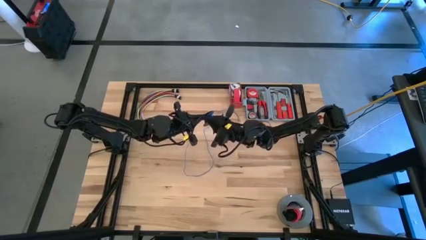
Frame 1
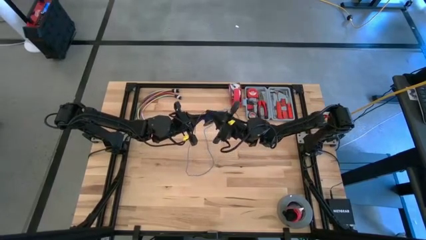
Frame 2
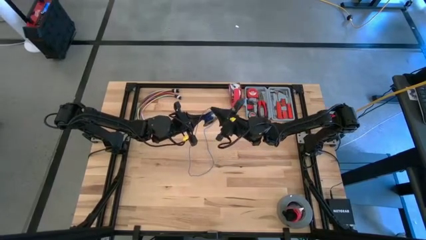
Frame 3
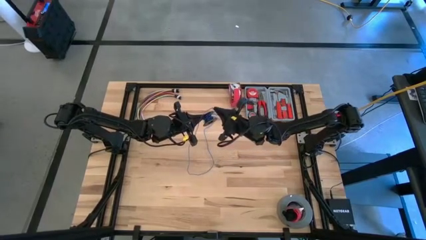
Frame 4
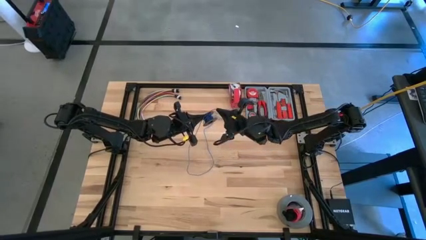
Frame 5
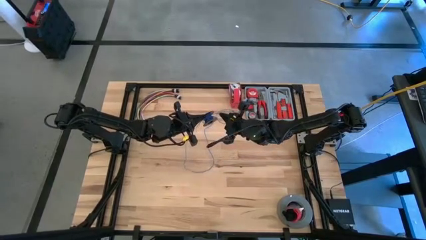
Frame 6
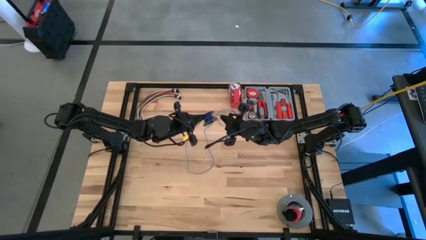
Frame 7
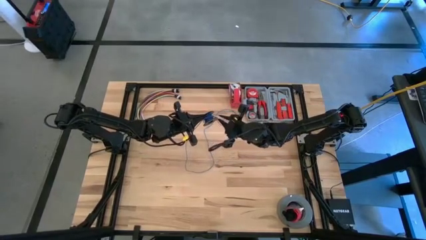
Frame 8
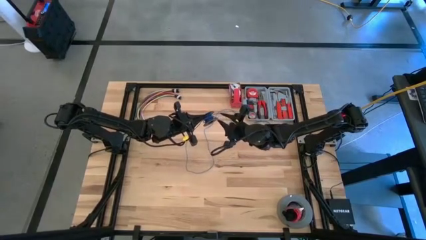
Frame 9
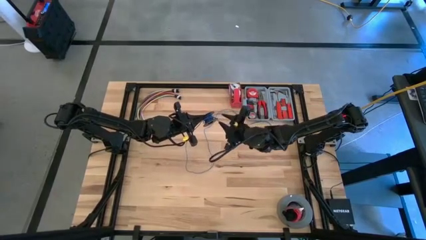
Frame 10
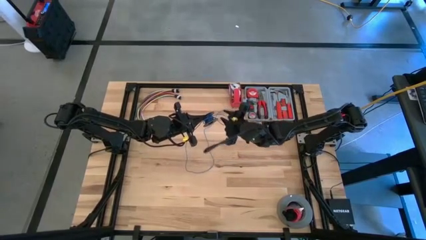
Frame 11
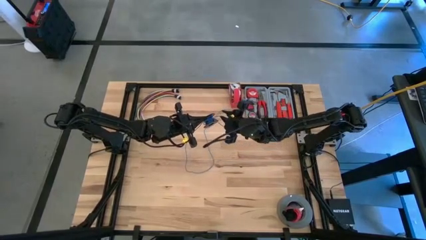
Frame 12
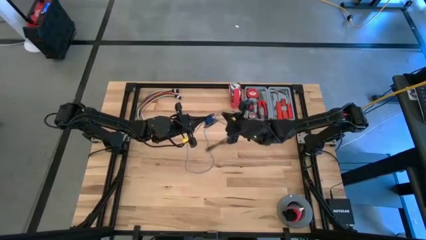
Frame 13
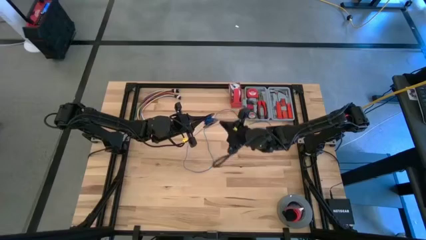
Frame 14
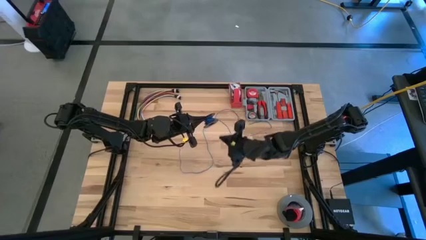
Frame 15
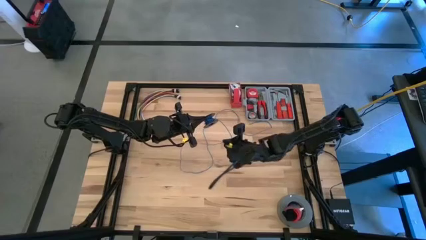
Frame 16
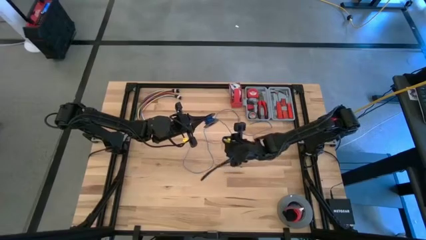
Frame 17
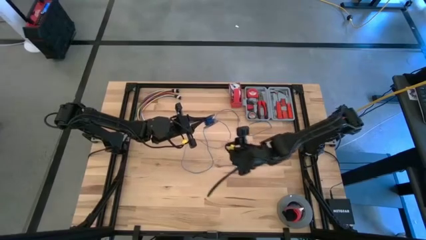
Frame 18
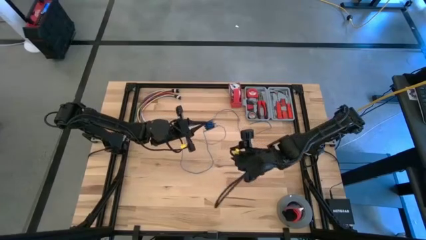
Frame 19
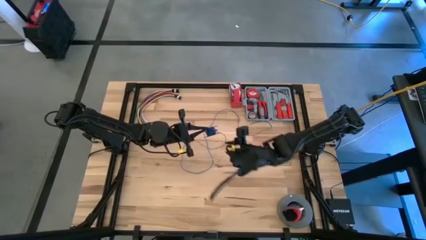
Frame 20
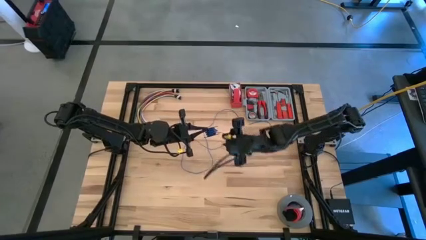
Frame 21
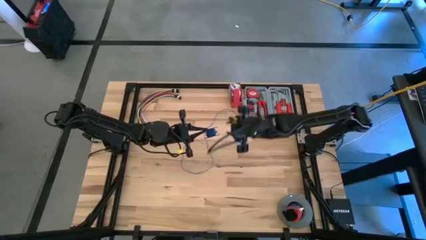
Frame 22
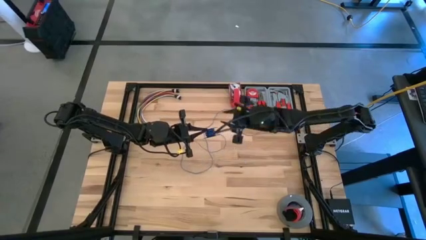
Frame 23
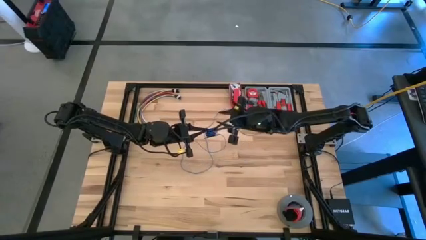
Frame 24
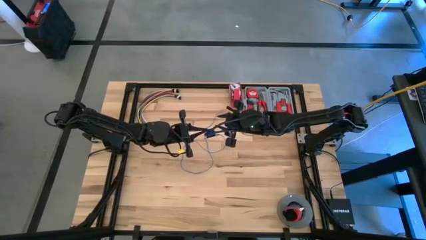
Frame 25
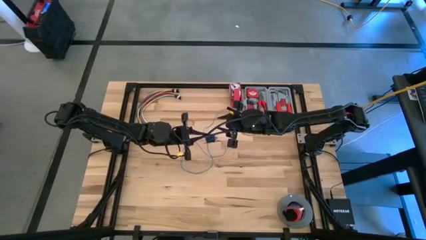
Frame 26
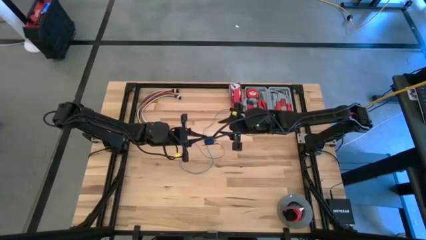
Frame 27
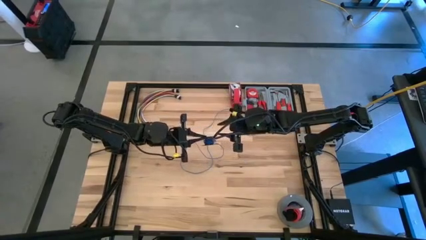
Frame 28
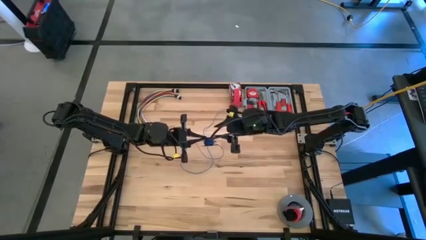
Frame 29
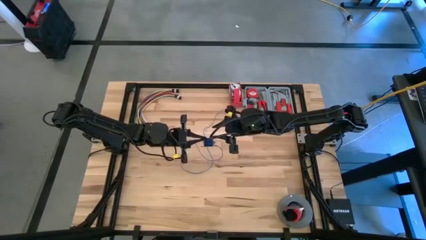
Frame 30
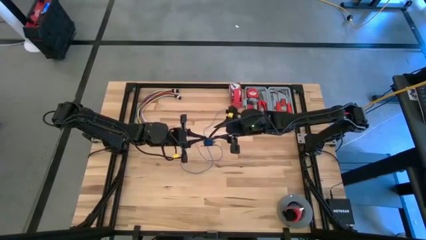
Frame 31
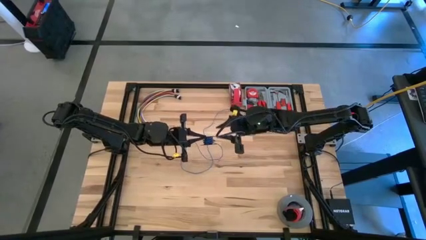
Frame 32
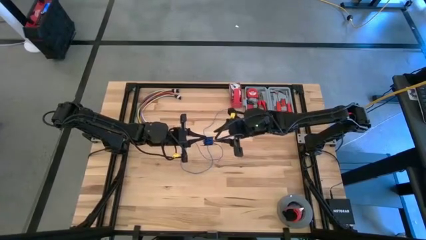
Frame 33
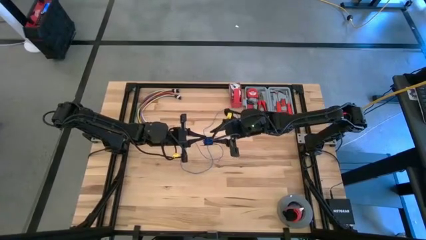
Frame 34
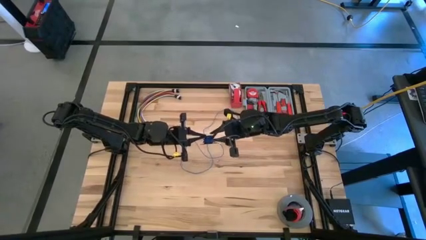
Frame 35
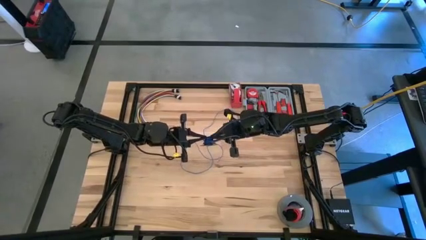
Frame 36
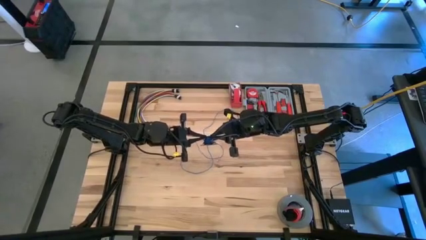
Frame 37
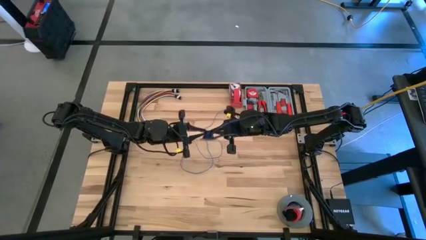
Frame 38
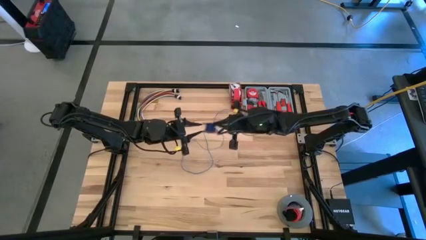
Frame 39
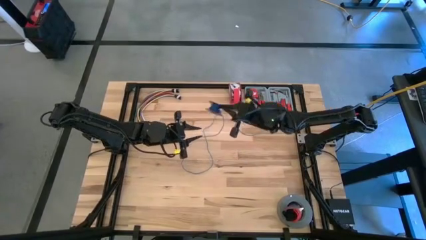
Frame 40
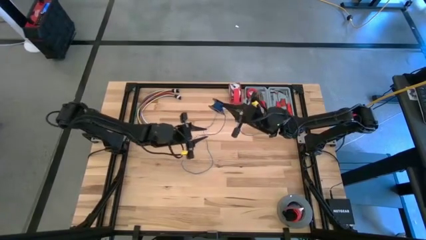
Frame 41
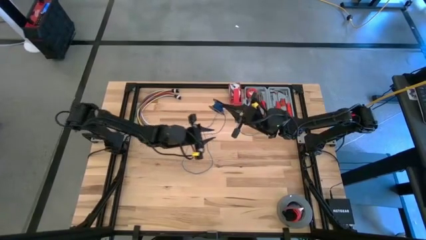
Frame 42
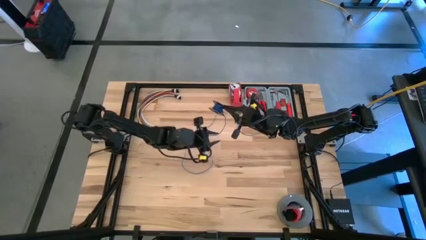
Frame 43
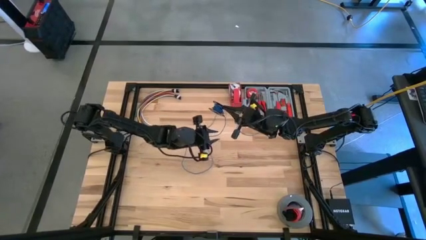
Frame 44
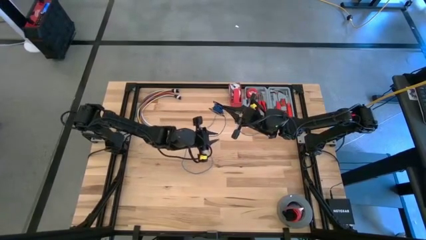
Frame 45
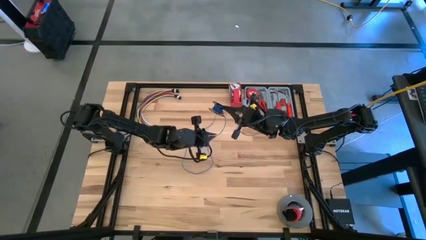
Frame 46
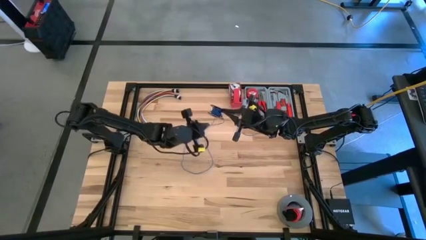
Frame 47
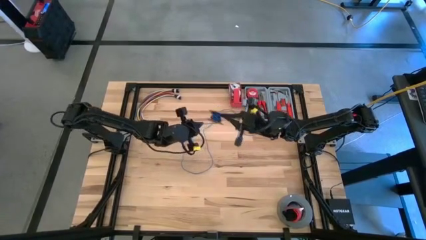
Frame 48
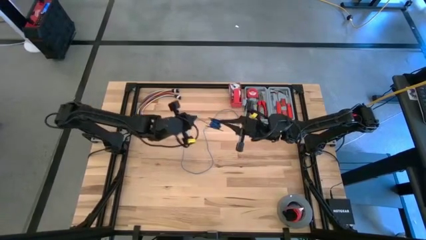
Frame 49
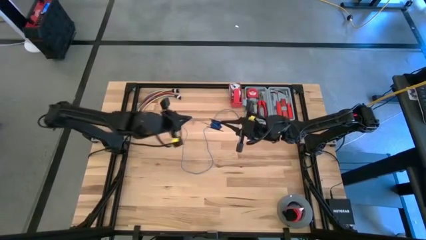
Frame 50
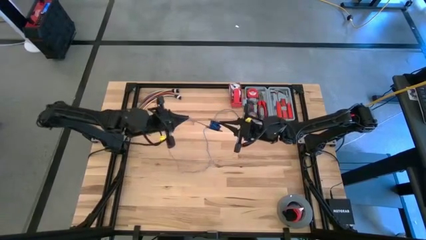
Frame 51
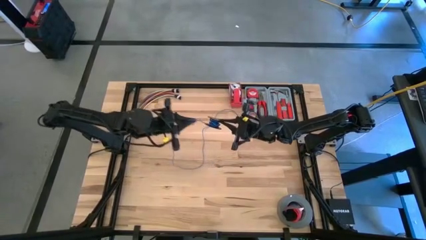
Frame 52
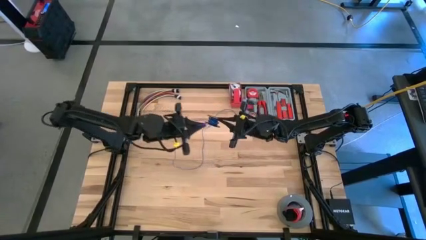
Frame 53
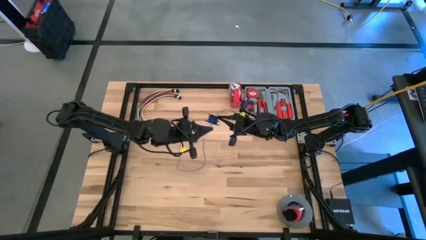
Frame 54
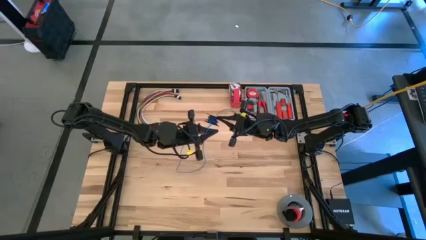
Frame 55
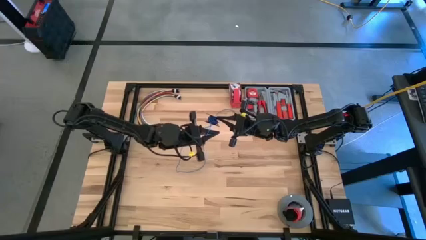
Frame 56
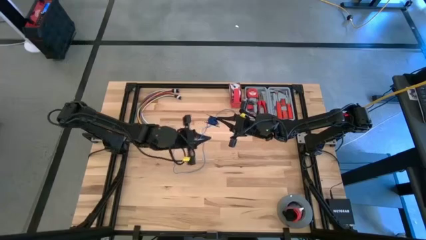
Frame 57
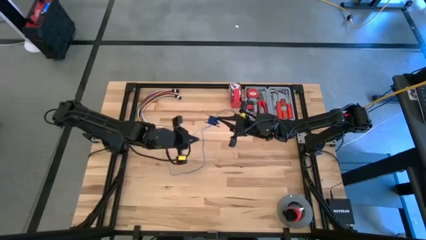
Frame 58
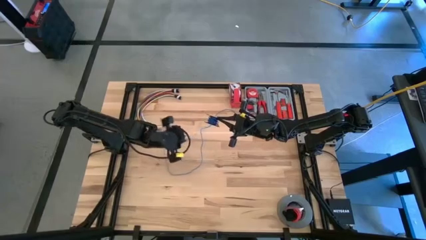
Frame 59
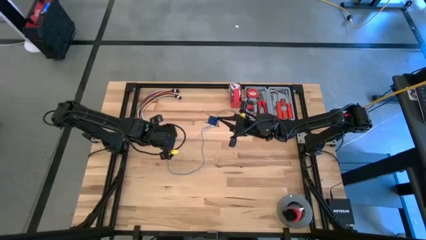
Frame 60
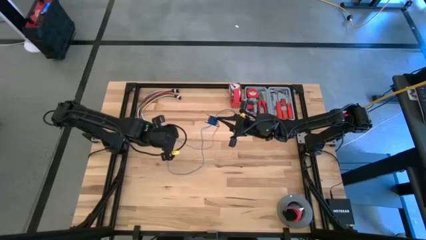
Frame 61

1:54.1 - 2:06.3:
Task: Coil cords
Coil the blue wire on the black spool

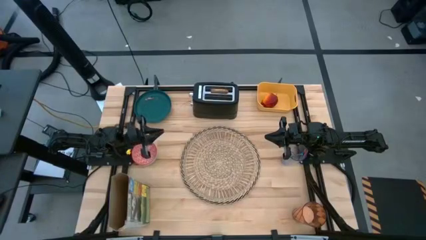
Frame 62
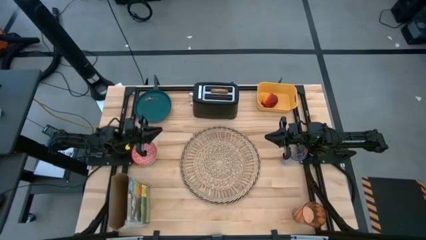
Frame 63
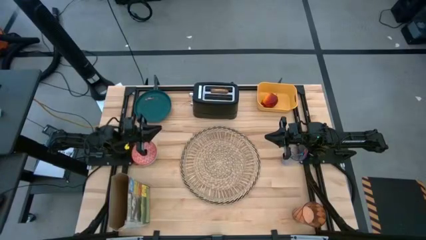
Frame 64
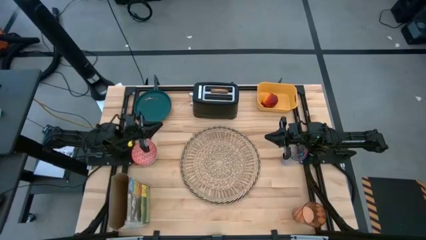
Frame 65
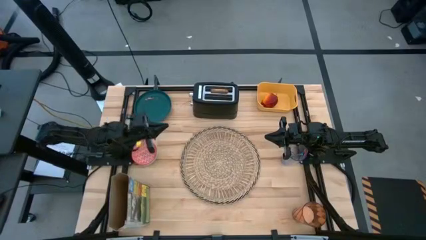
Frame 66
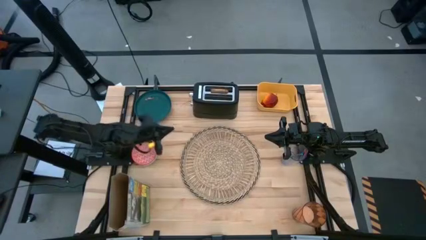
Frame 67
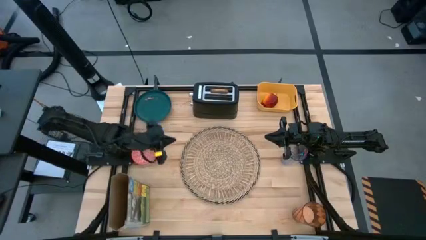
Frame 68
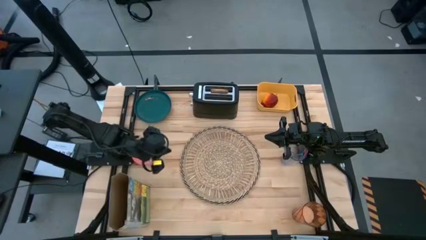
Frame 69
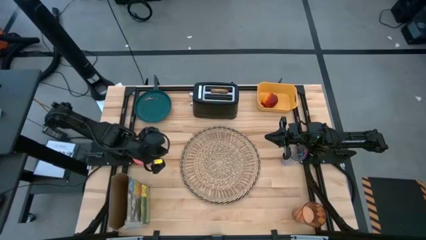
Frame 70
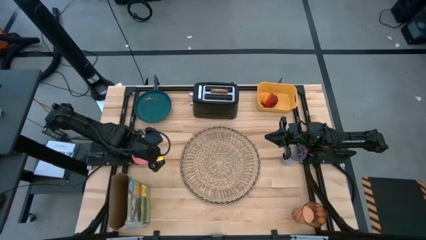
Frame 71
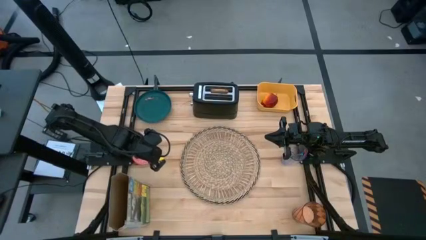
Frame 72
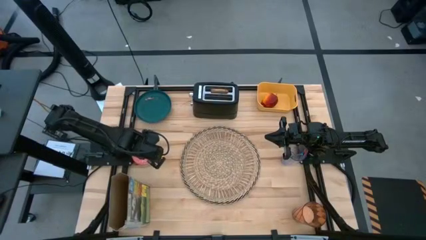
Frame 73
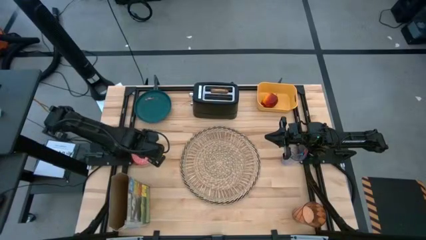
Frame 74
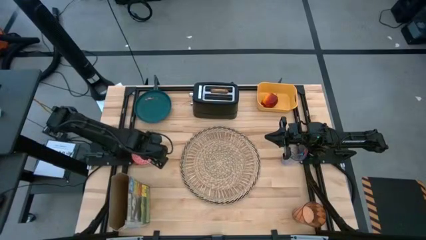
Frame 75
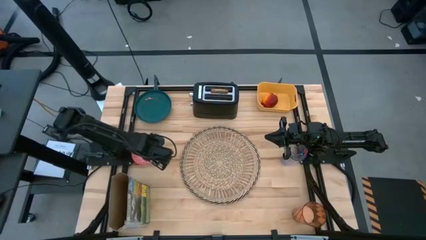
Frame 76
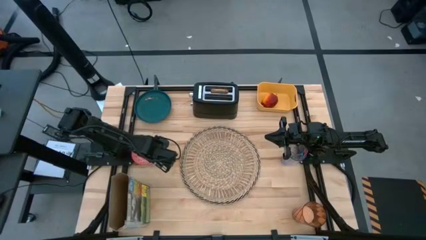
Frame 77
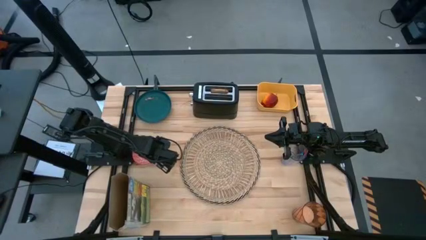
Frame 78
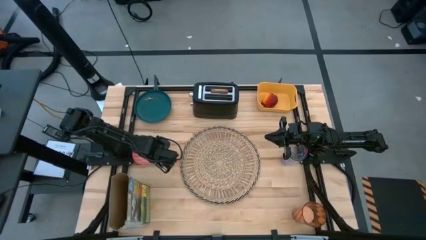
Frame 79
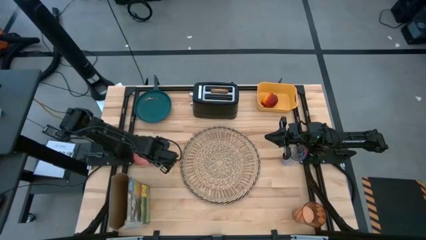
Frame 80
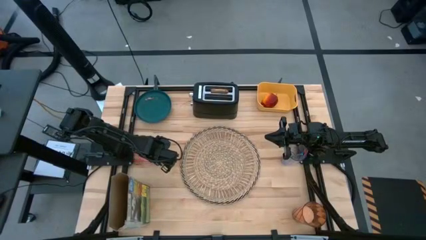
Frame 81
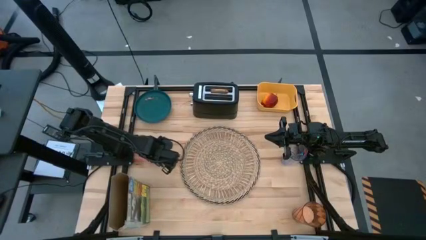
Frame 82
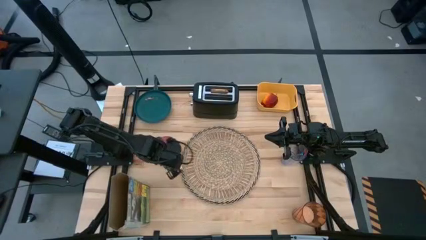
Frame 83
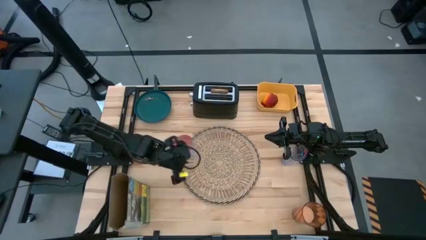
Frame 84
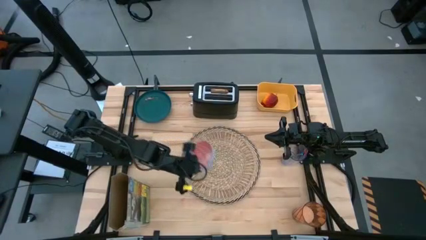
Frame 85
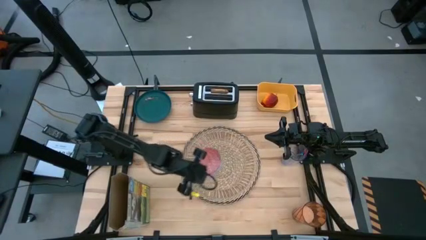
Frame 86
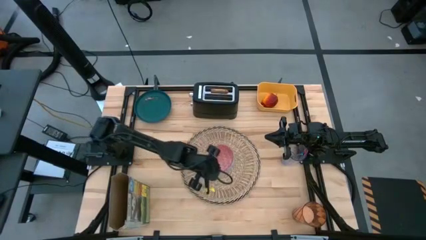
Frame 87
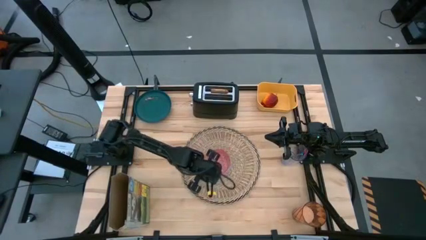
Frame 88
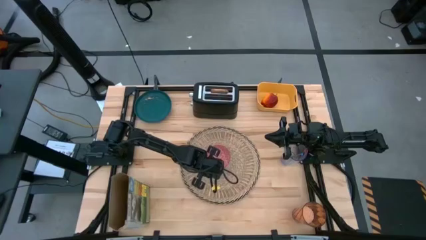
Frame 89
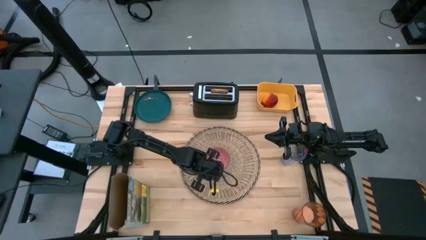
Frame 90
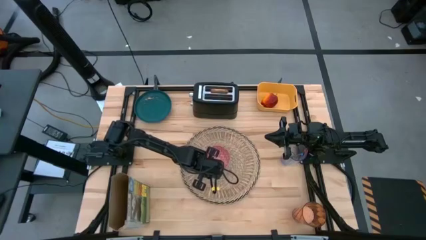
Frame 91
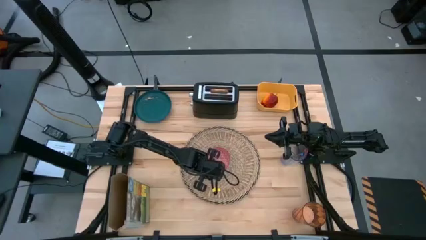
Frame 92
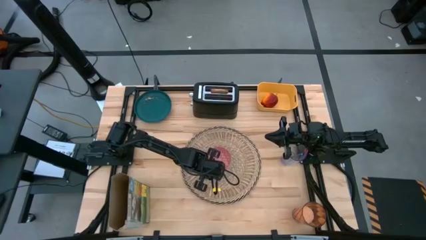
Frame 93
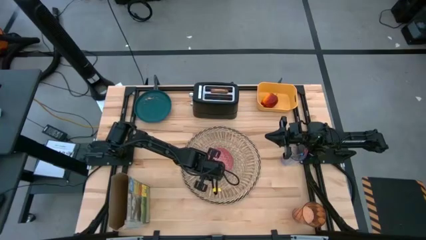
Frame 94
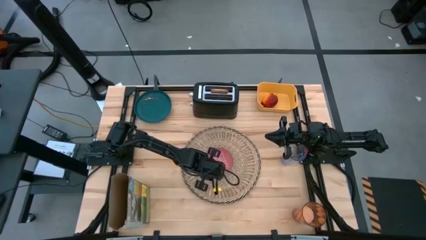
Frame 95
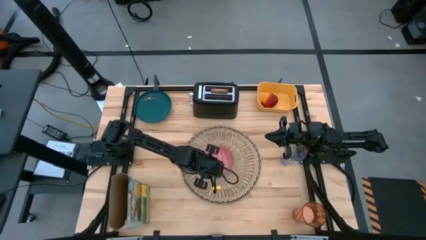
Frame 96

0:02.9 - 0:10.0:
Task: Arrange a breakfast setting
Put the red bowl on the brown table mat
